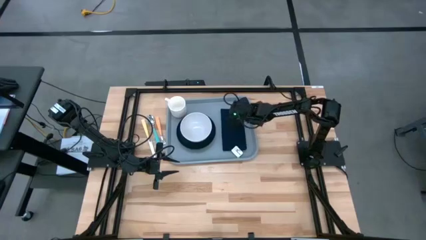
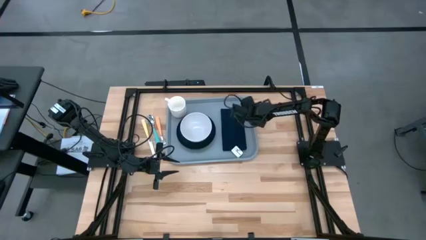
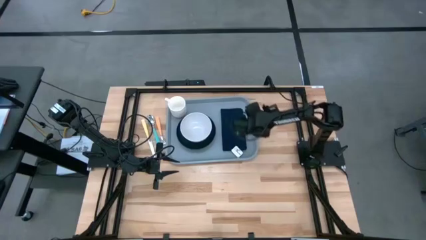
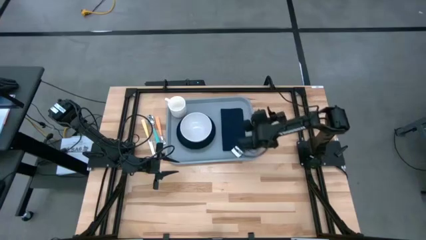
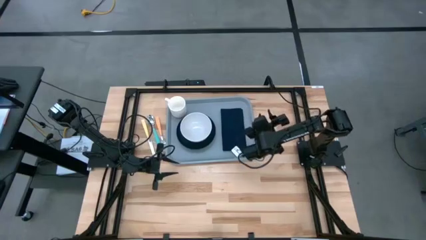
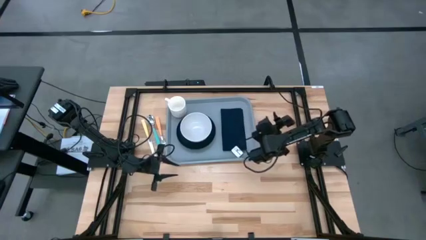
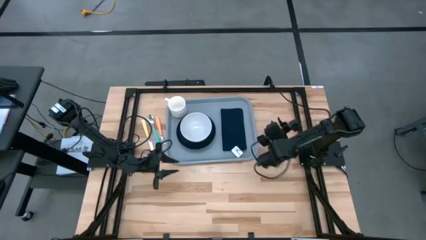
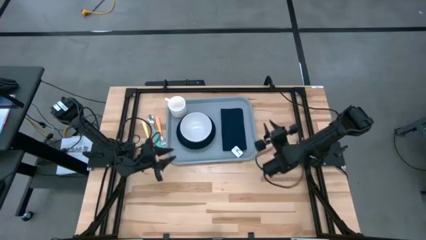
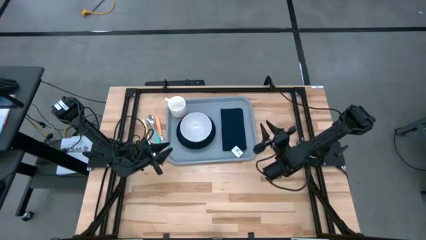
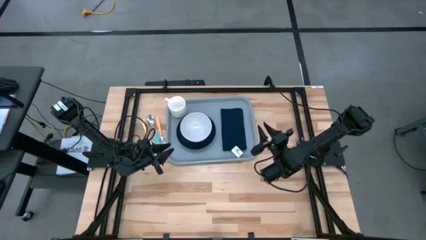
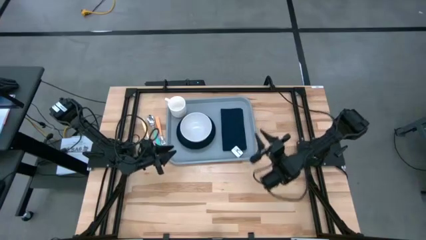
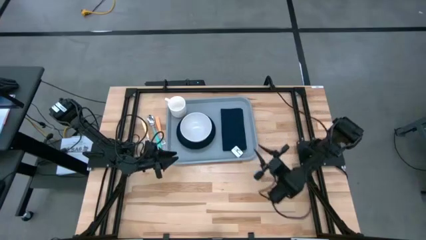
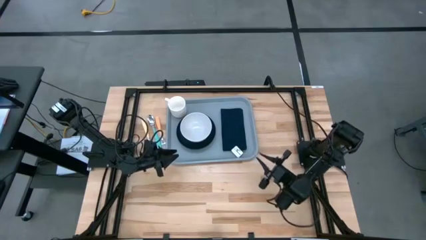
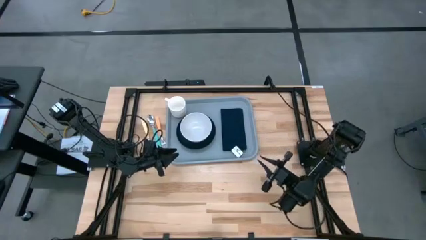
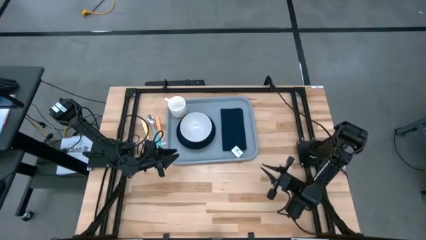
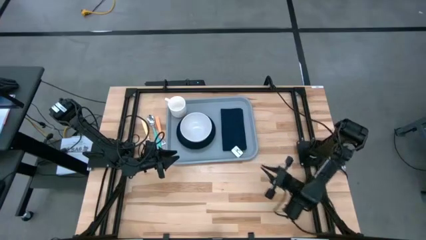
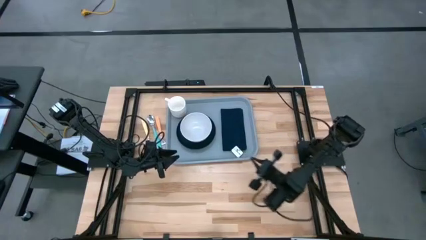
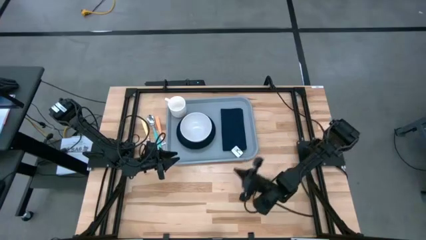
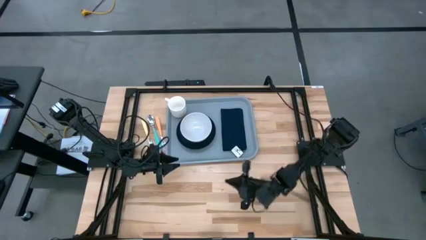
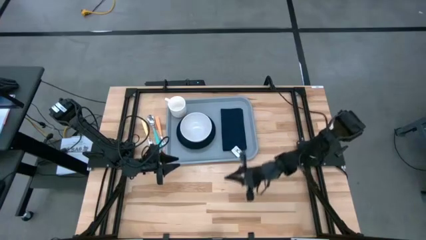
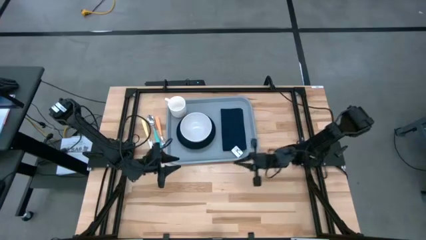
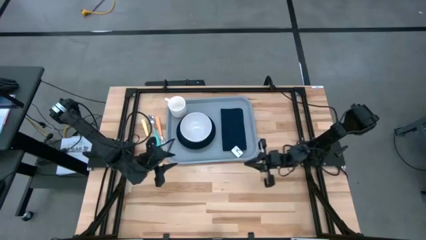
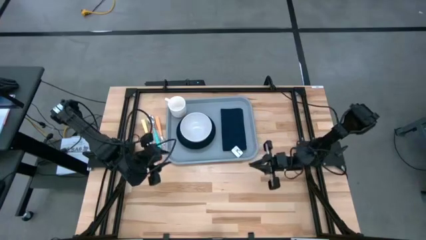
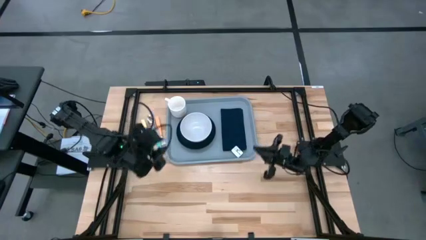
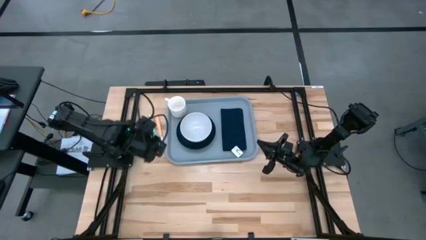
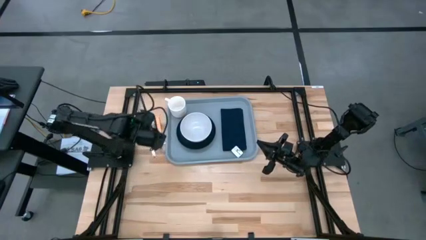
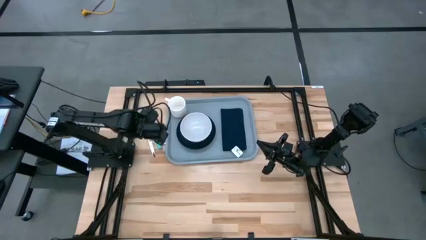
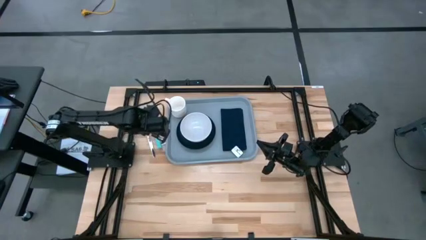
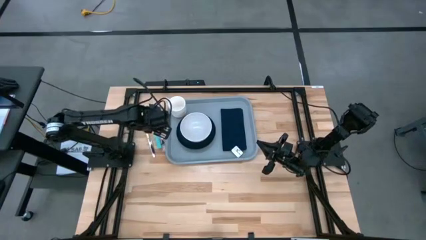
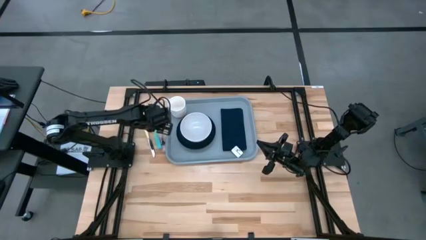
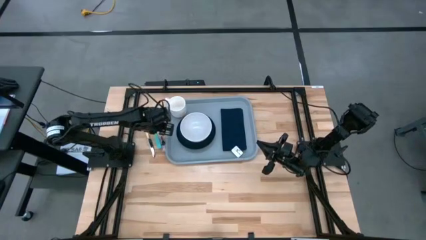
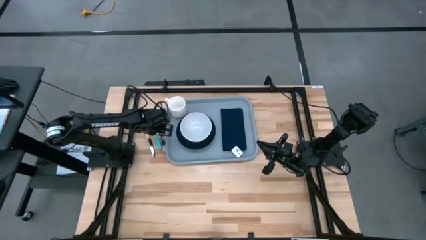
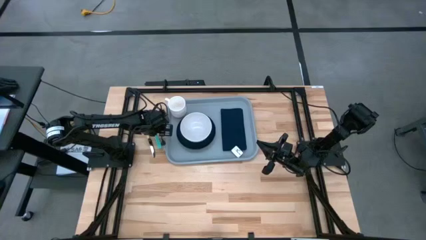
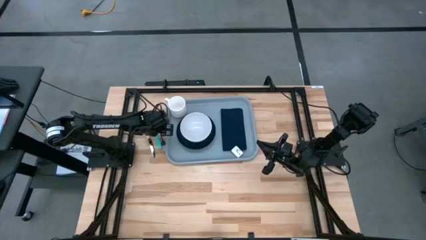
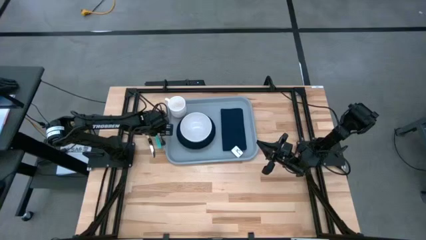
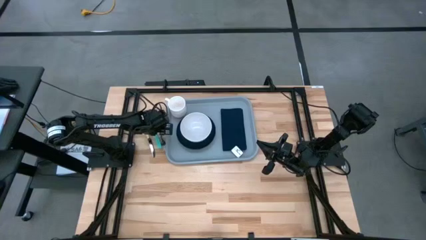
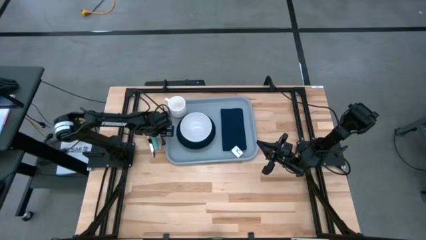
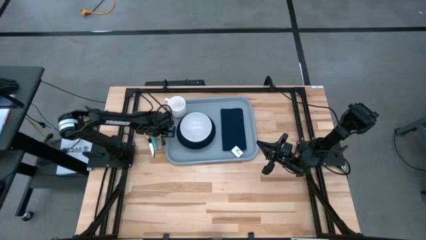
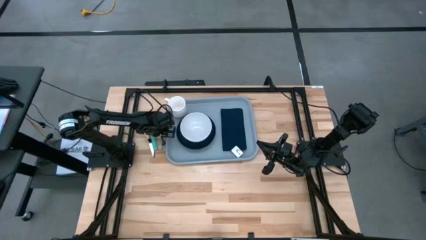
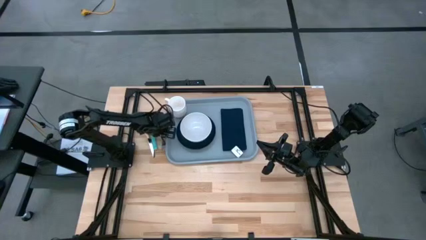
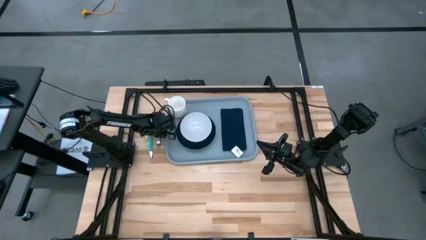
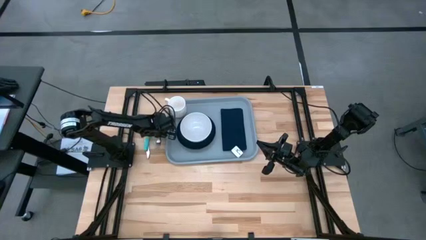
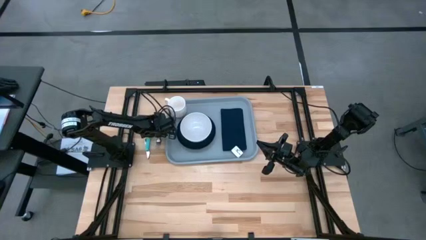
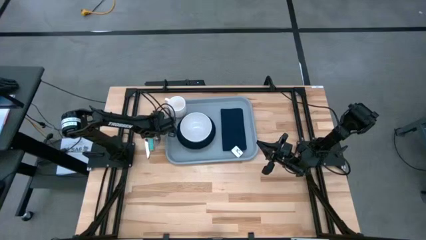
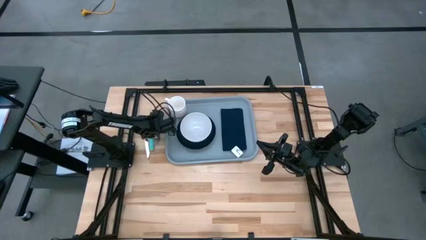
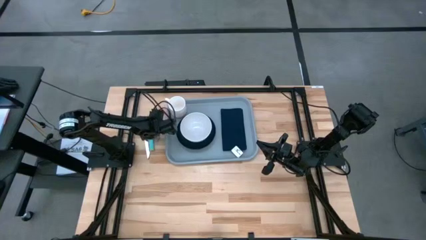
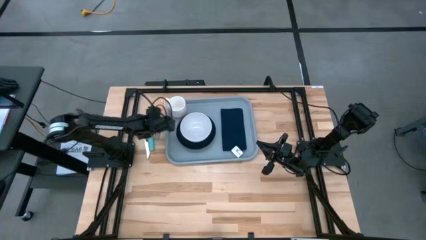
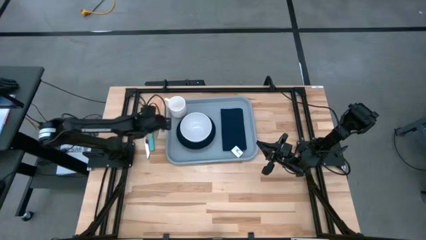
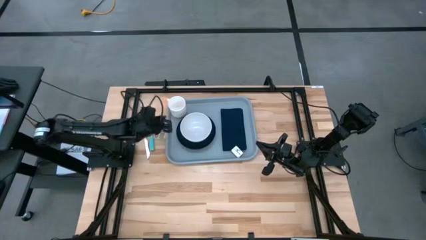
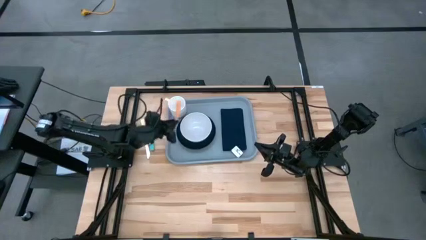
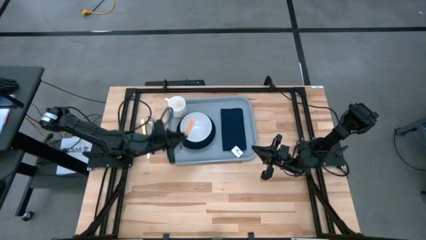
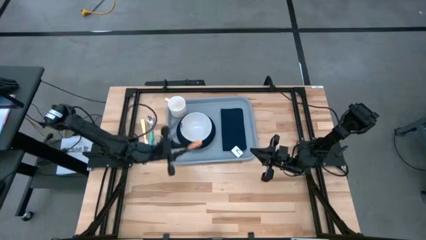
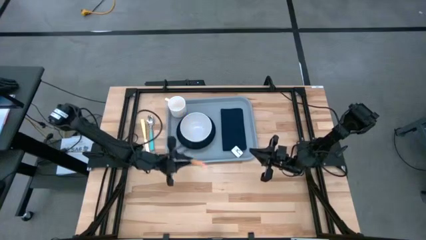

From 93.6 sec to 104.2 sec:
Task: Set up tray
Put the orange fork on the black napkin

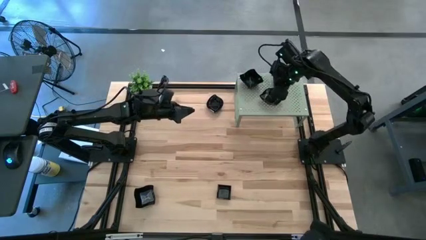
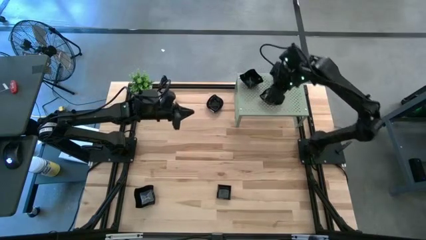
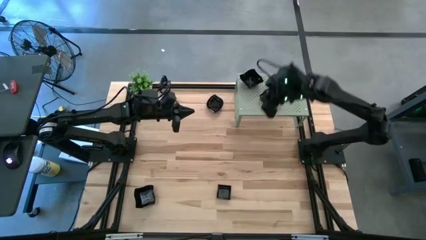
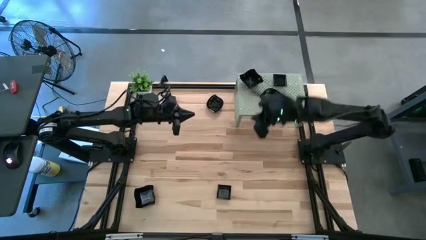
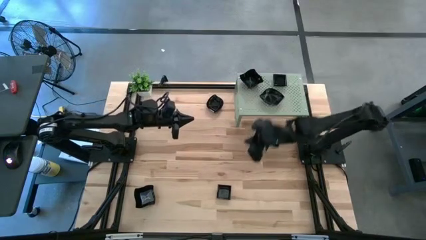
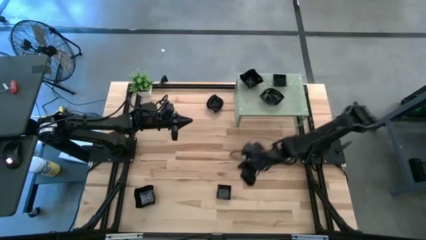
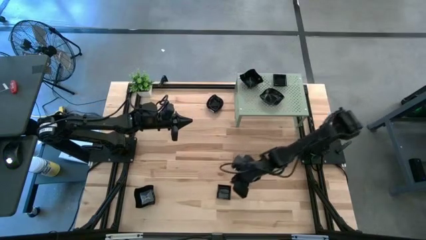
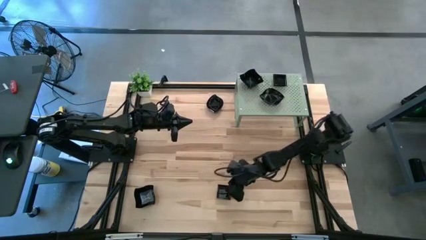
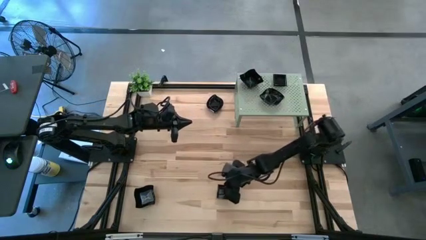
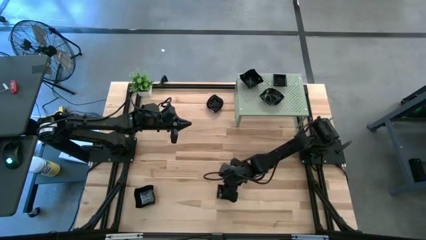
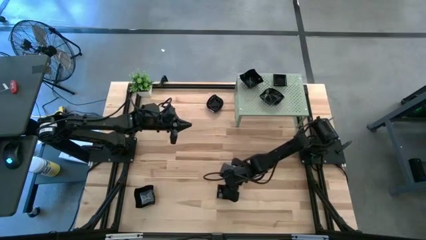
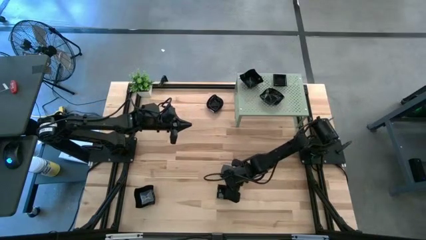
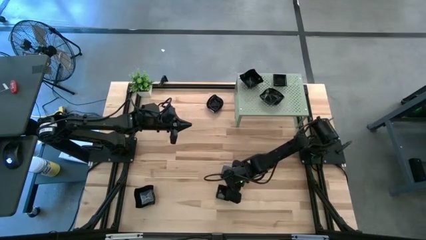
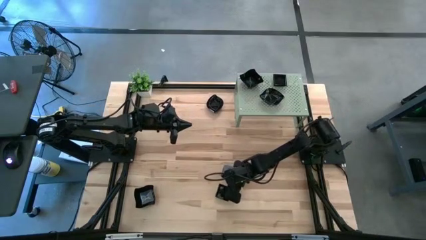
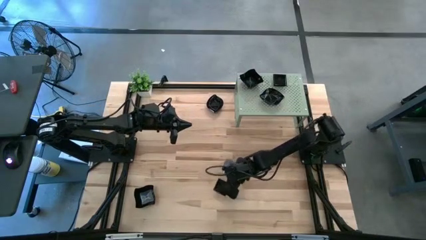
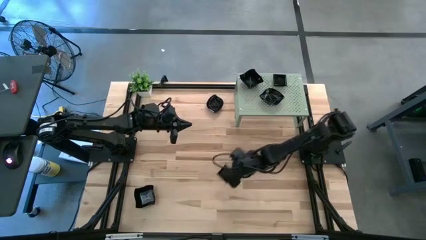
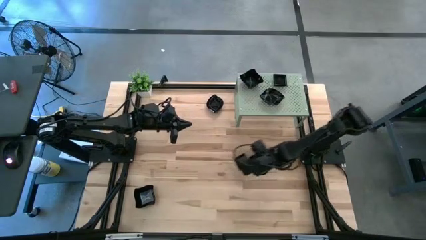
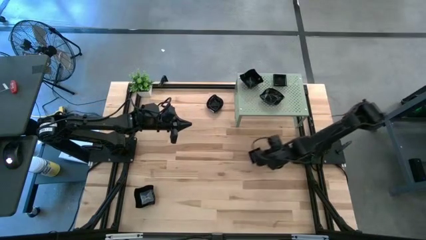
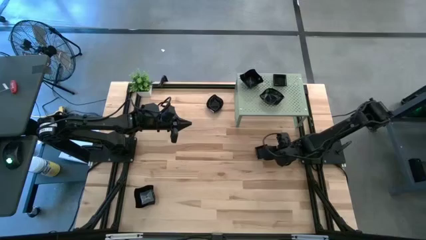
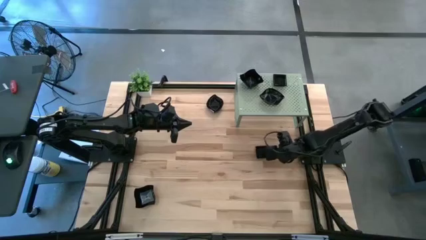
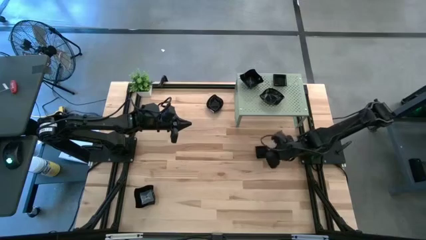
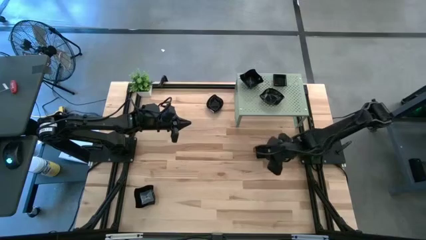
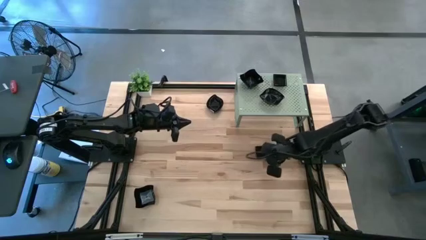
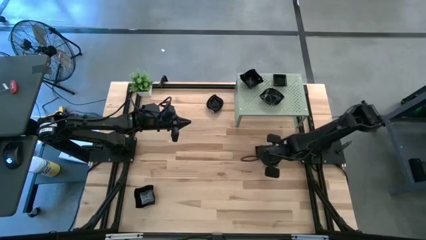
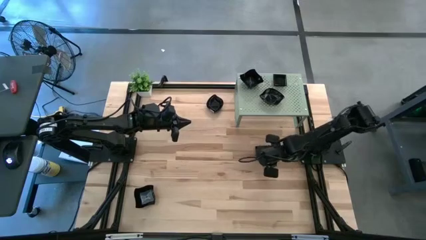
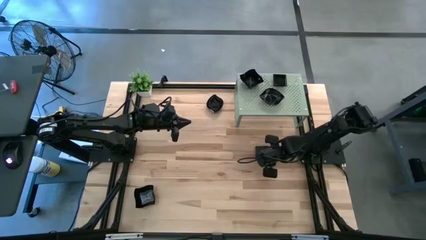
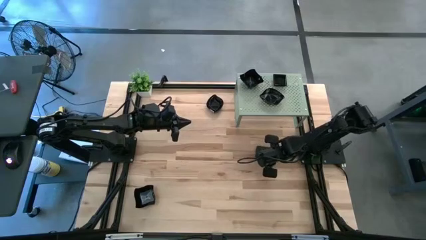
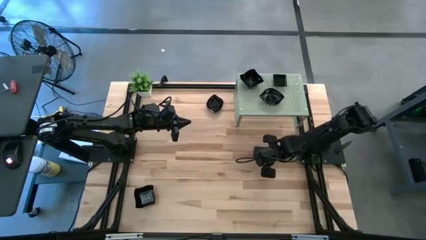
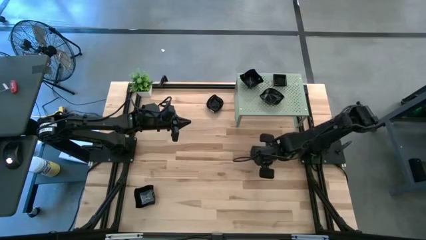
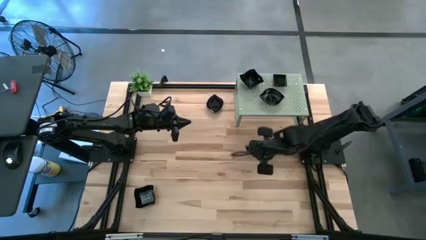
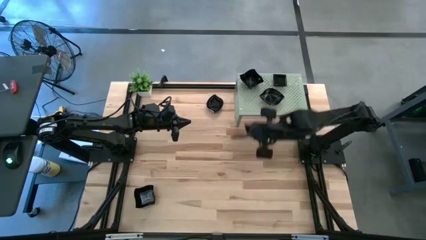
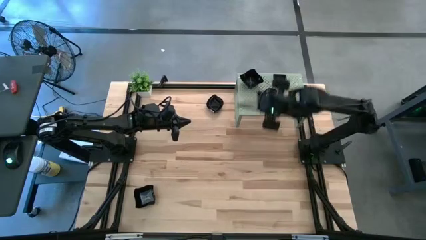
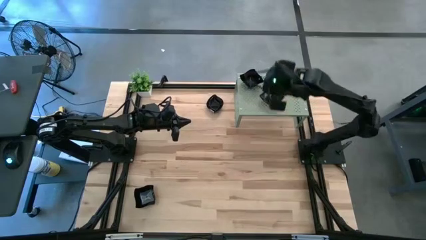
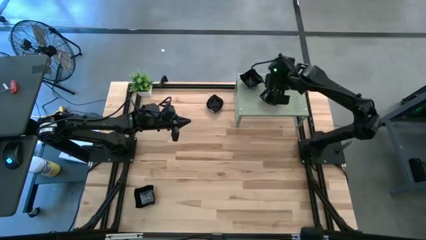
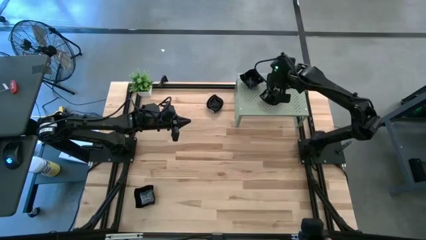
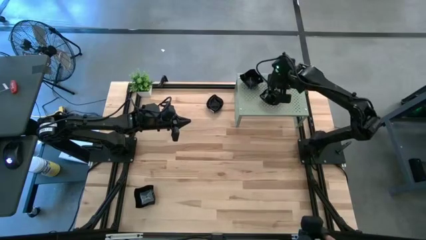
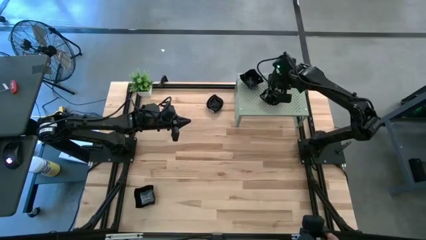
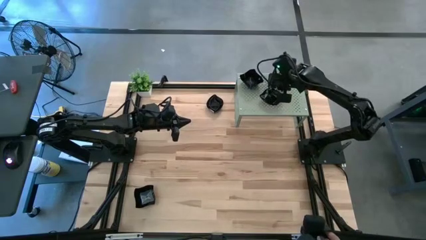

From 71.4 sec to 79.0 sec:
Task: Pick & Place Mini shaped plates
Stack the square plate on top of the stacked square plates on the shelf
